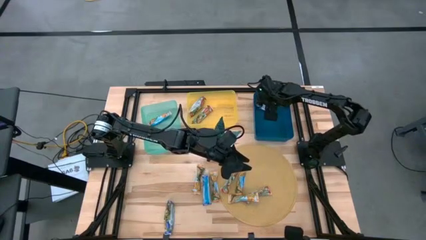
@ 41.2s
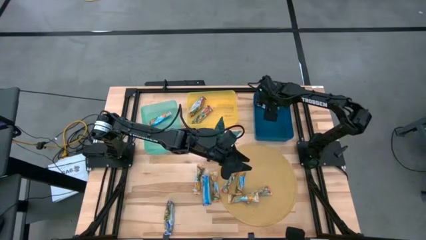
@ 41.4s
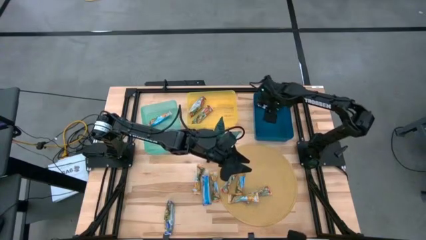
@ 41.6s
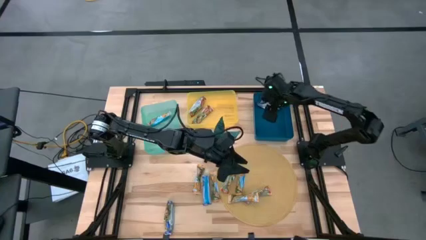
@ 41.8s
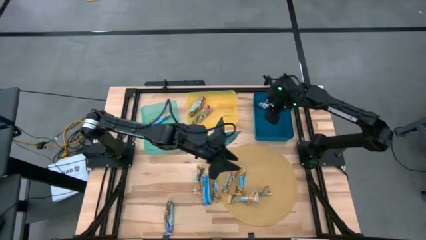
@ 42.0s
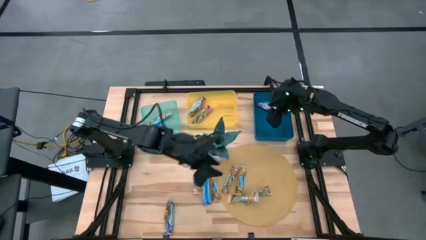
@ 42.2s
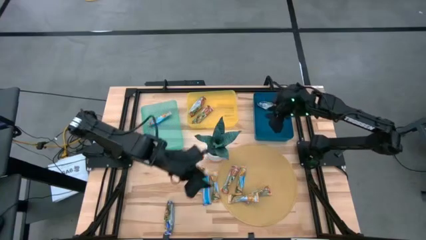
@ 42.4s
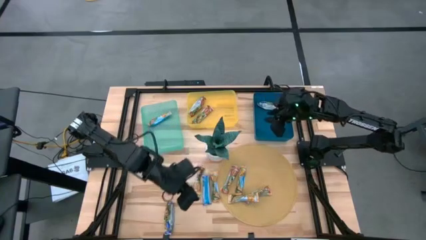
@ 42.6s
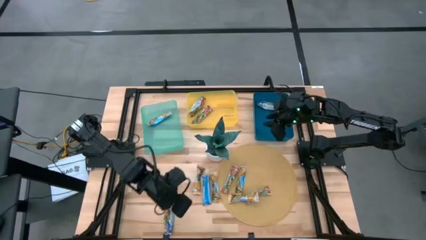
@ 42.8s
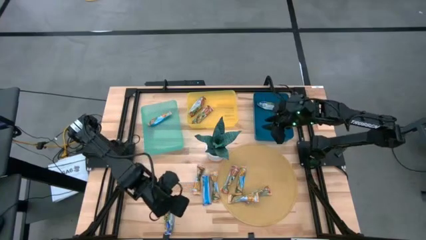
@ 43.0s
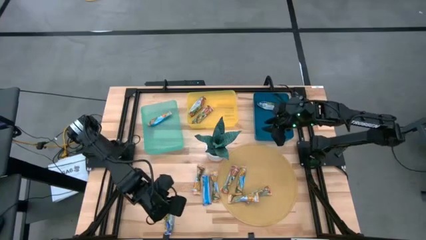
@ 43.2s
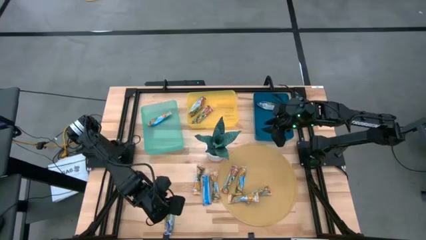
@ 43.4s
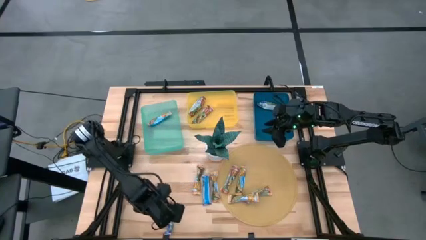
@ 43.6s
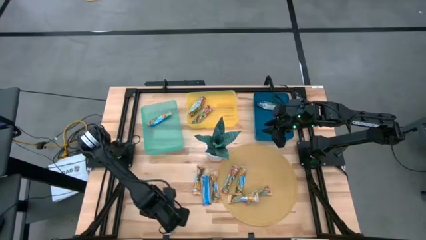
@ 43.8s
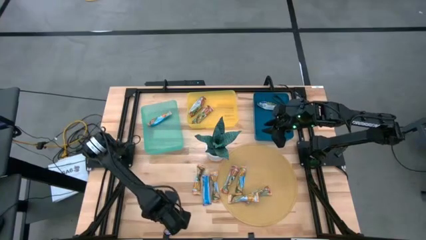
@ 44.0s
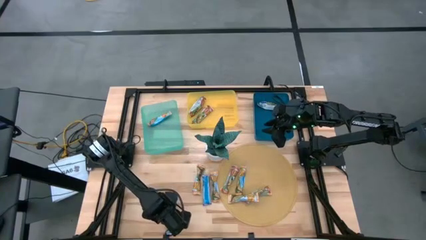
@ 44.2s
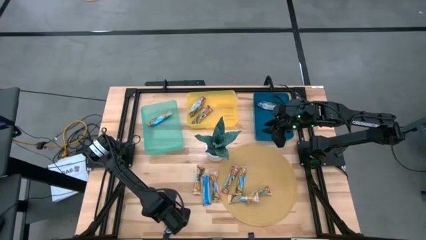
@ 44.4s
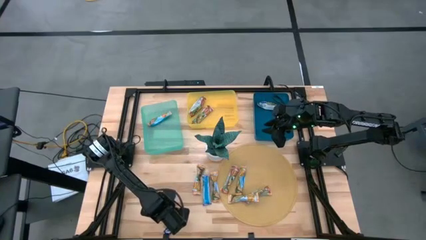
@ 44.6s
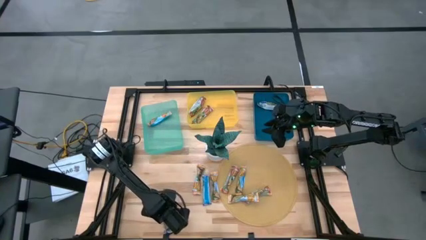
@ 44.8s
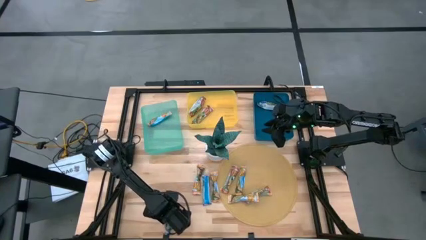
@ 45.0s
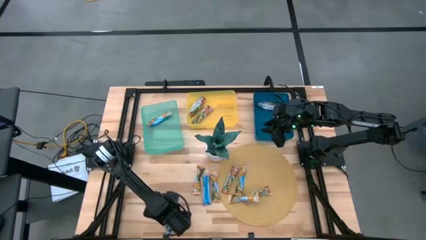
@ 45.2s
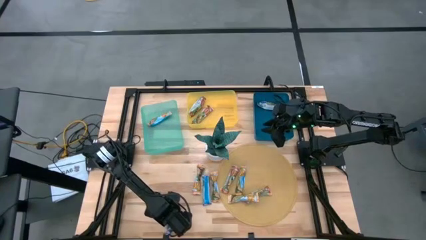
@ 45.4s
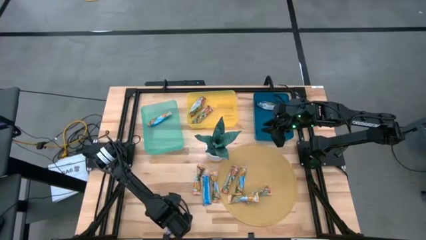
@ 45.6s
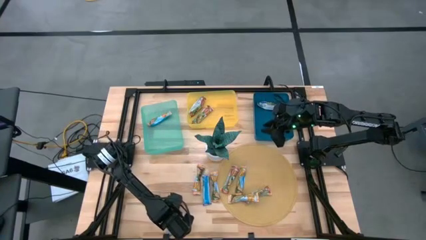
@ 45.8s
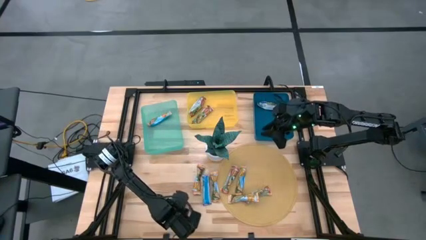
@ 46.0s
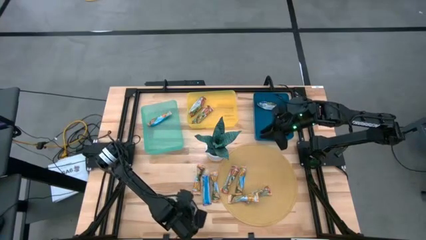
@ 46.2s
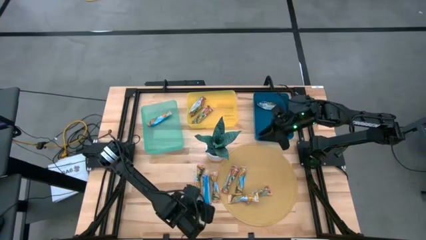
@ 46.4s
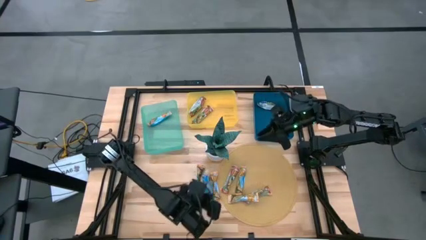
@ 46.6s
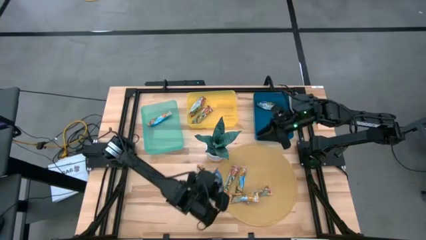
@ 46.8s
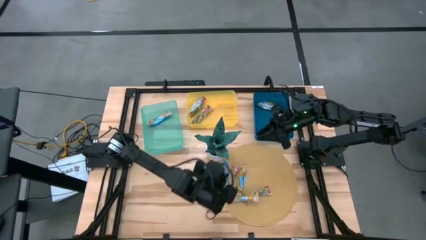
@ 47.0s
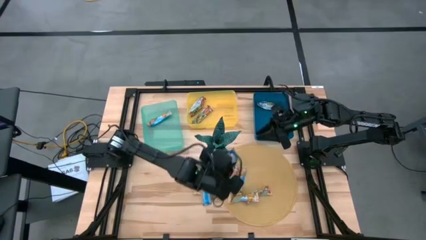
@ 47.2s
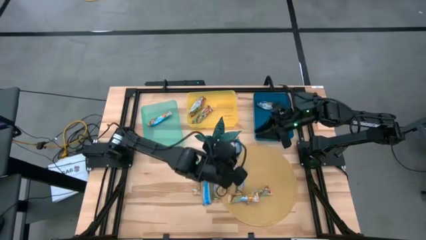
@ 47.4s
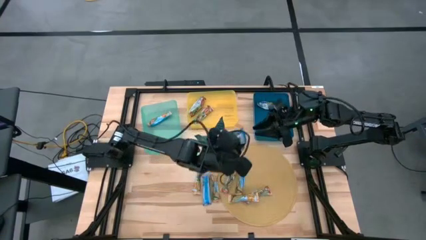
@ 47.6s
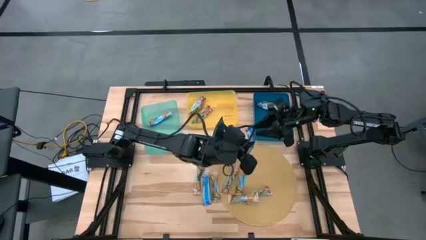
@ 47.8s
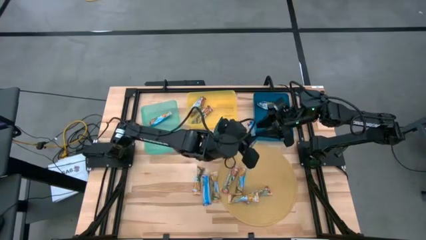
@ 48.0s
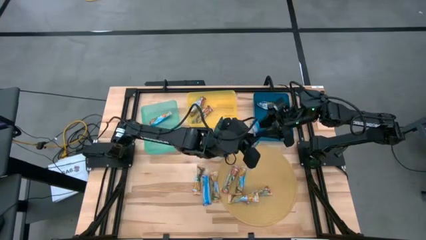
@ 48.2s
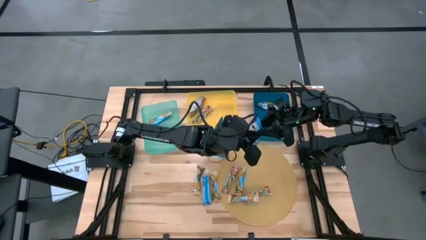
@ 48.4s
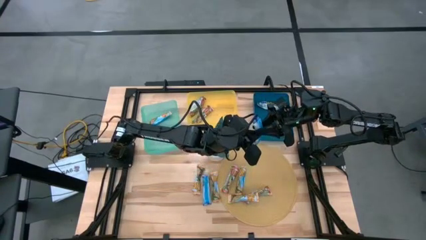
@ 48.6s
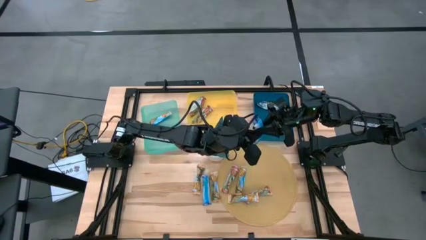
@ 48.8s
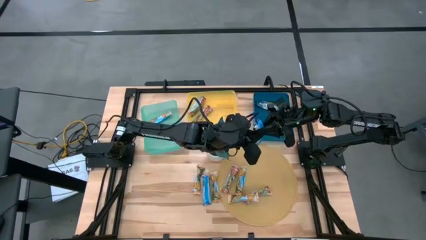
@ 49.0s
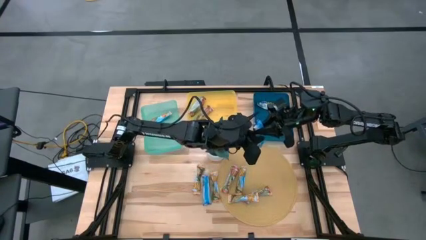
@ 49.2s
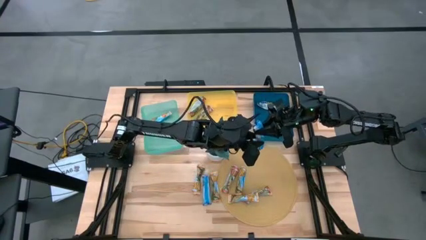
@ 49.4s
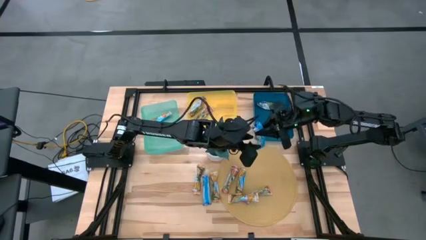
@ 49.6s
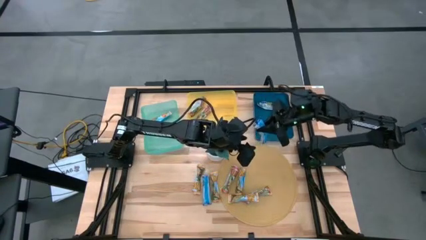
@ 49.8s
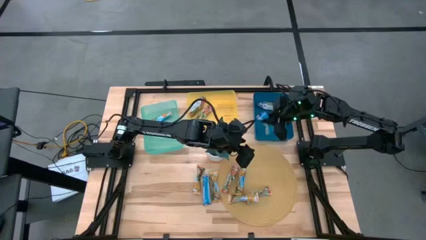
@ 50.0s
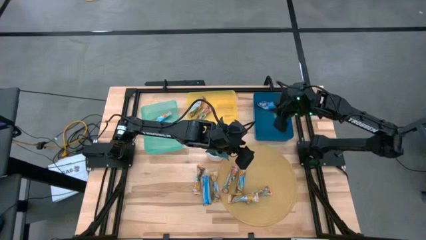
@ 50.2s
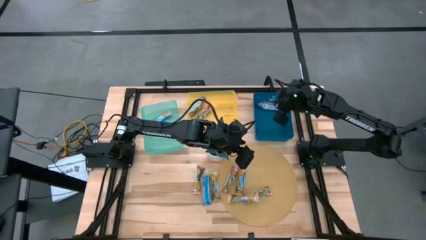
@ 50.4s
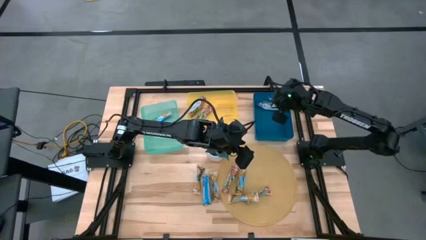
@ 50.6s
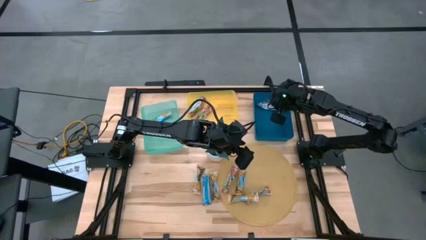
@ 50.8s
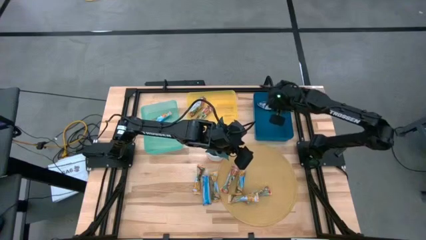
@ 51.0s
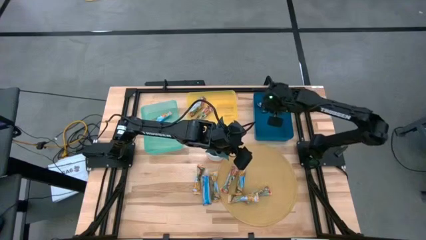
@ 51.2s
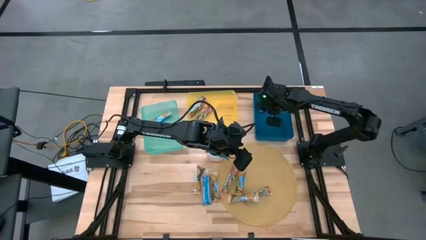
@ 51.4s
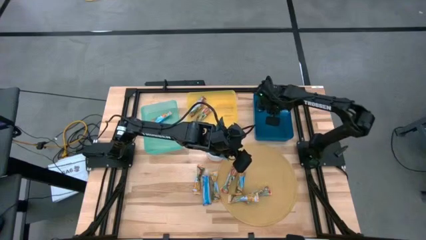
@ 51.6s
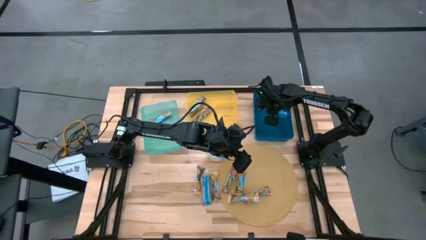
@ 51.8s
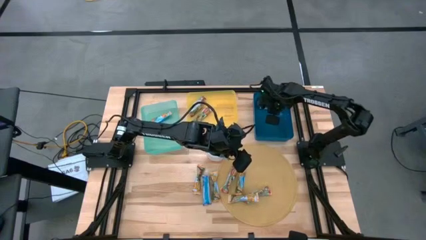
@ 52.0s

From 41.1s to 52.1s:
Task: Pick and place Granola Bars by type
Put the purple granola bar into the blue bin
